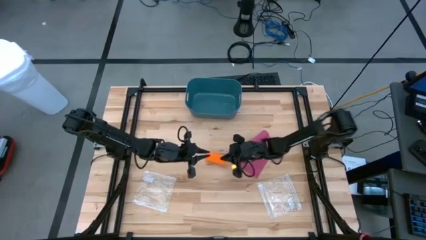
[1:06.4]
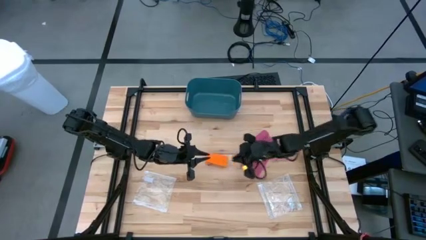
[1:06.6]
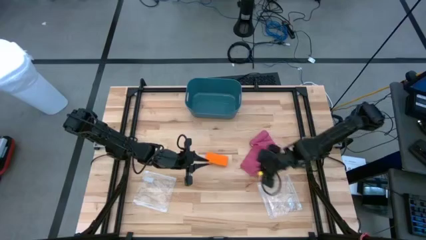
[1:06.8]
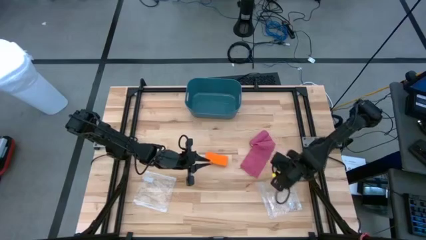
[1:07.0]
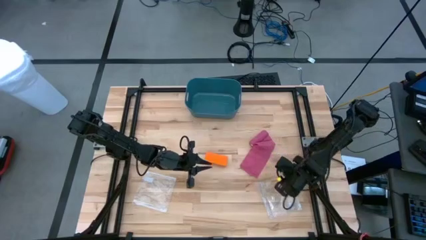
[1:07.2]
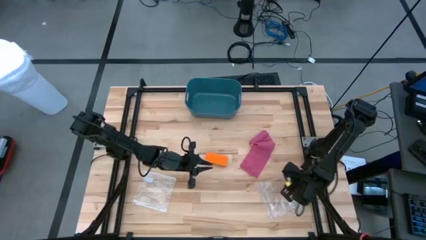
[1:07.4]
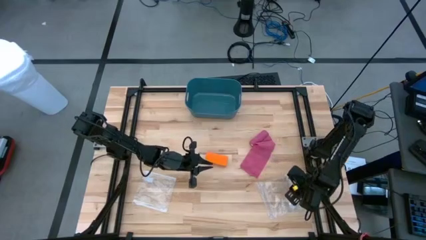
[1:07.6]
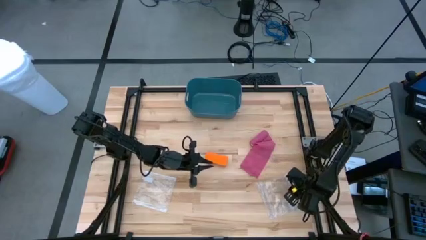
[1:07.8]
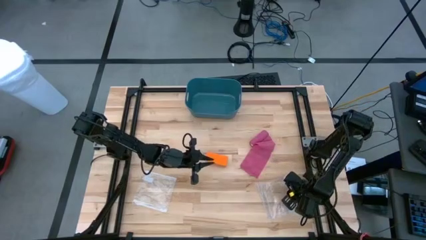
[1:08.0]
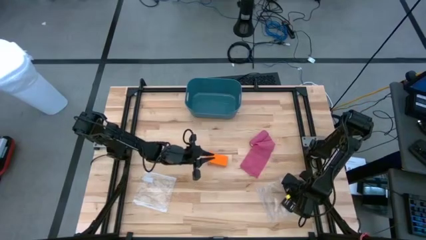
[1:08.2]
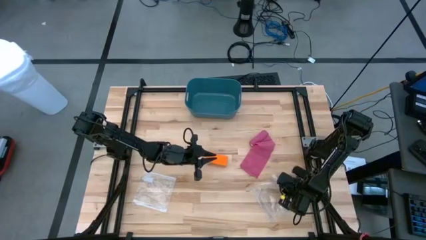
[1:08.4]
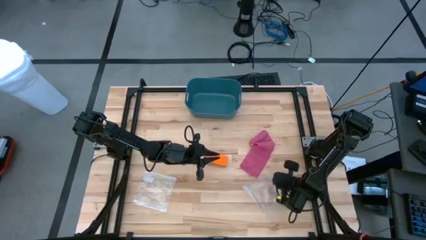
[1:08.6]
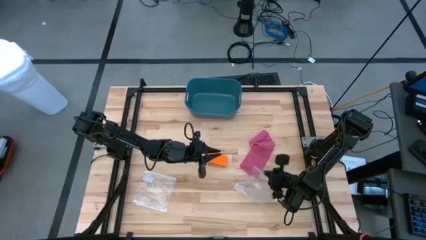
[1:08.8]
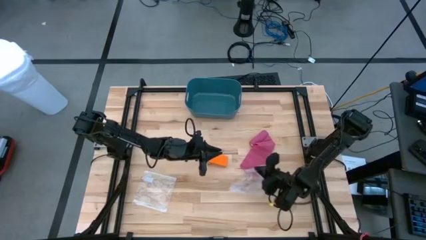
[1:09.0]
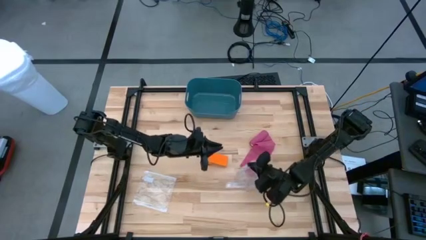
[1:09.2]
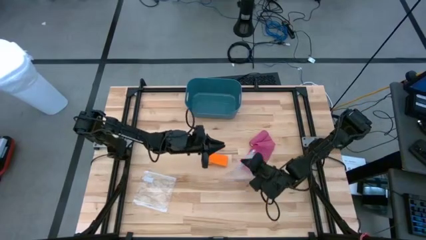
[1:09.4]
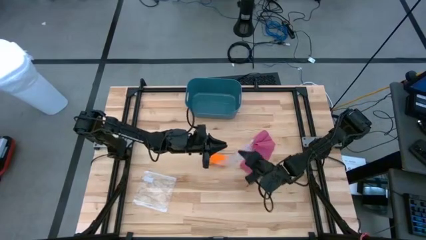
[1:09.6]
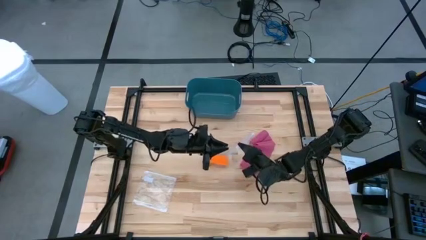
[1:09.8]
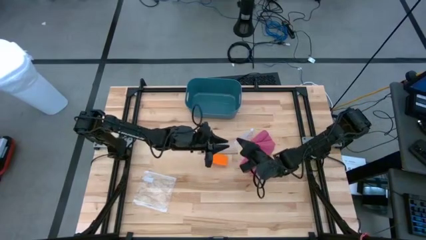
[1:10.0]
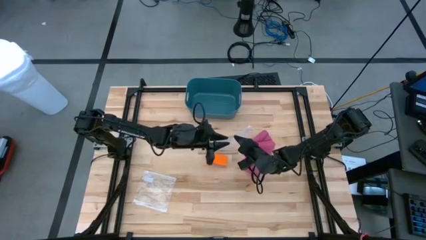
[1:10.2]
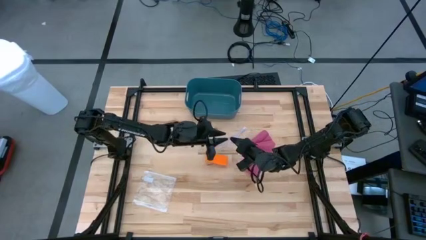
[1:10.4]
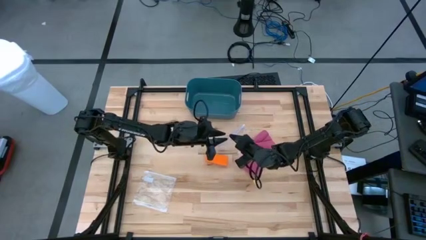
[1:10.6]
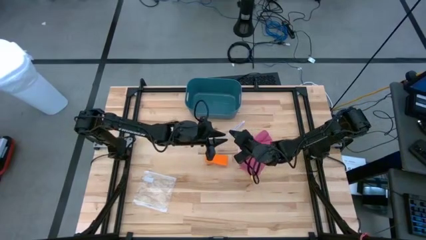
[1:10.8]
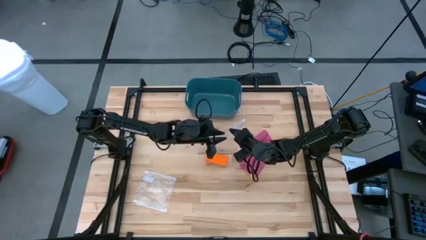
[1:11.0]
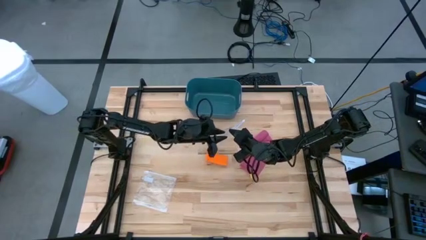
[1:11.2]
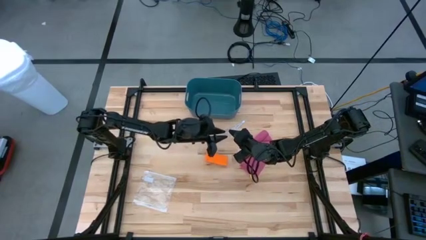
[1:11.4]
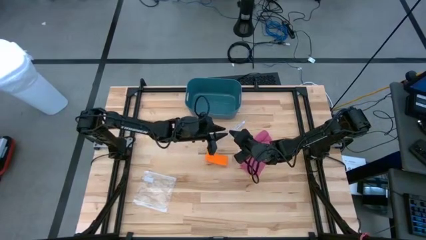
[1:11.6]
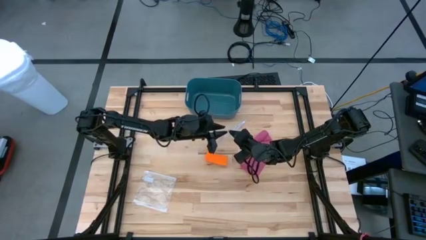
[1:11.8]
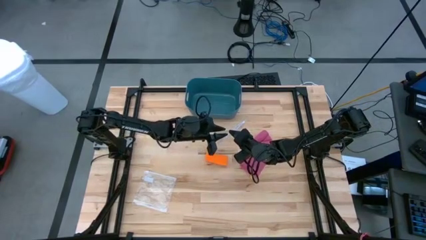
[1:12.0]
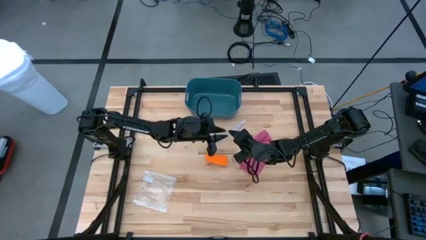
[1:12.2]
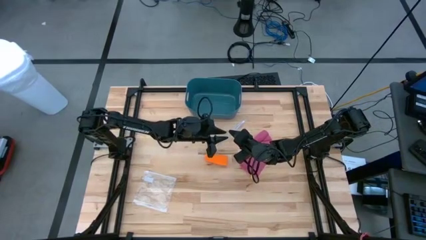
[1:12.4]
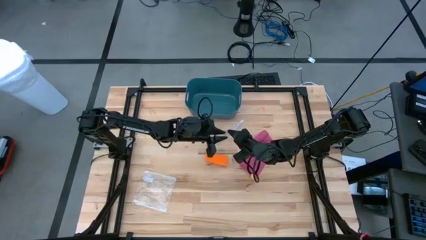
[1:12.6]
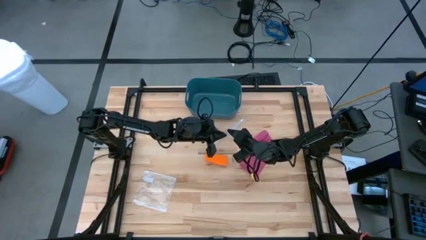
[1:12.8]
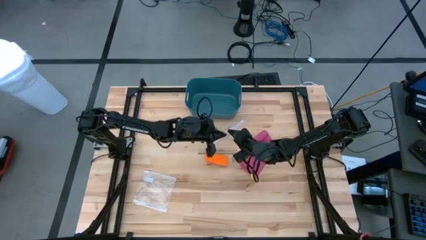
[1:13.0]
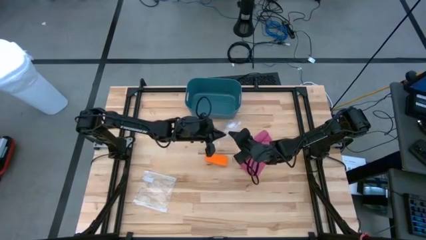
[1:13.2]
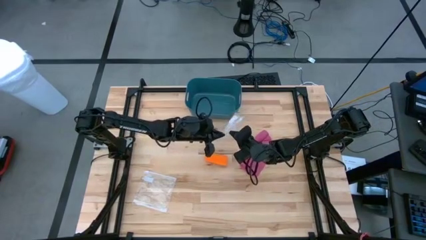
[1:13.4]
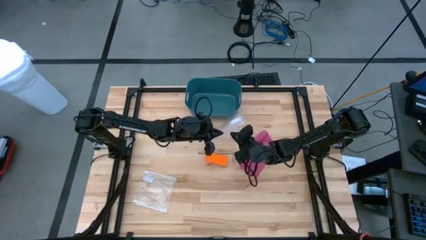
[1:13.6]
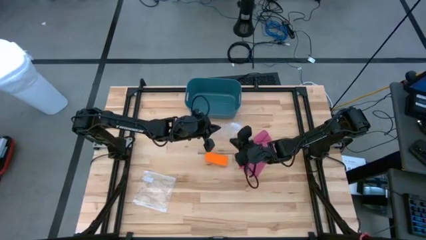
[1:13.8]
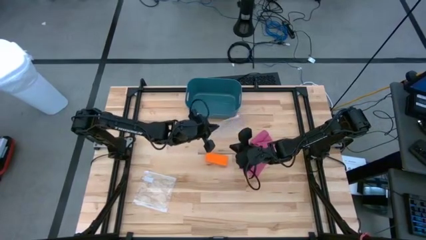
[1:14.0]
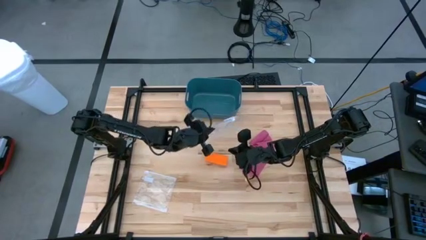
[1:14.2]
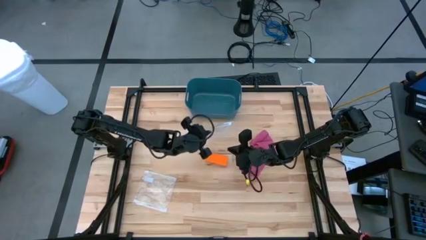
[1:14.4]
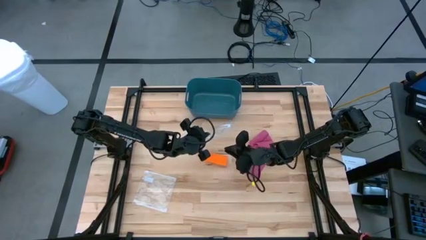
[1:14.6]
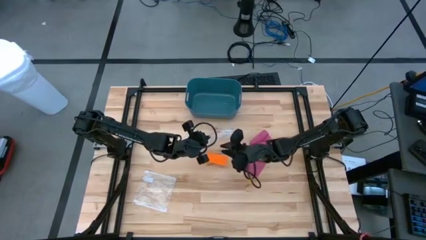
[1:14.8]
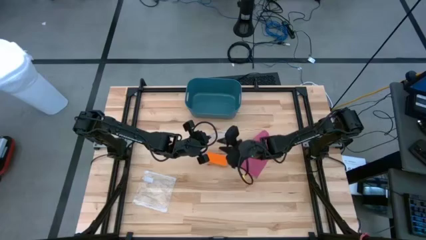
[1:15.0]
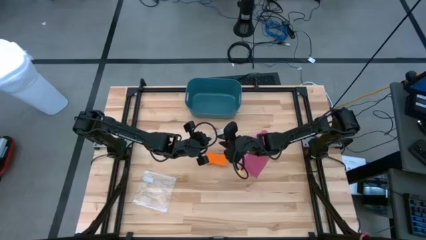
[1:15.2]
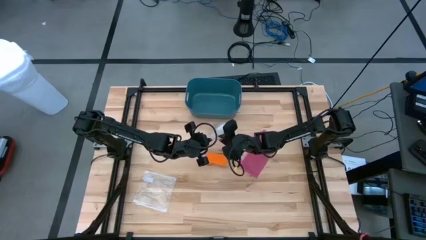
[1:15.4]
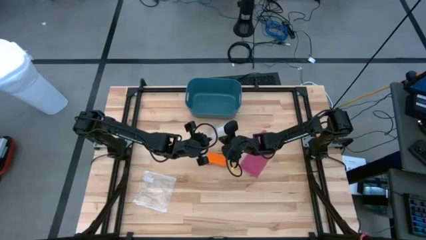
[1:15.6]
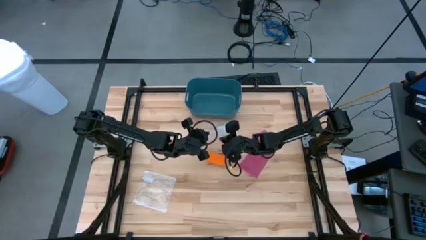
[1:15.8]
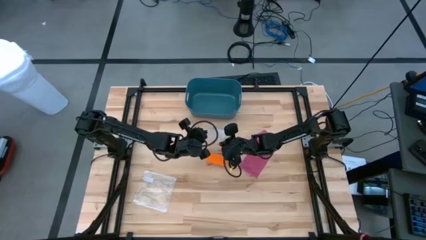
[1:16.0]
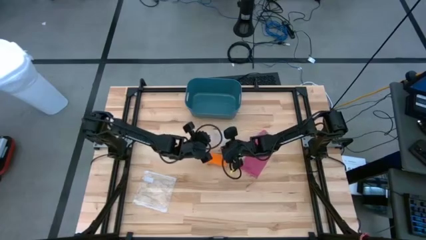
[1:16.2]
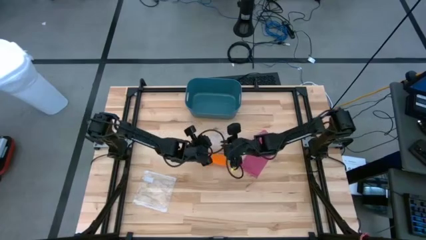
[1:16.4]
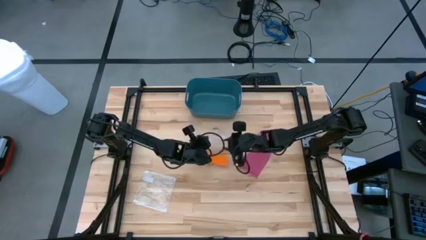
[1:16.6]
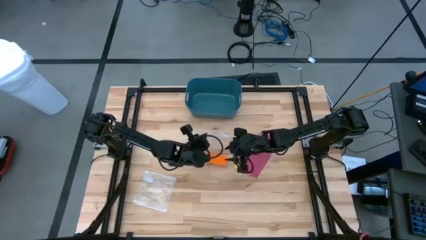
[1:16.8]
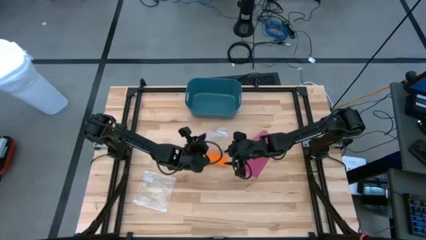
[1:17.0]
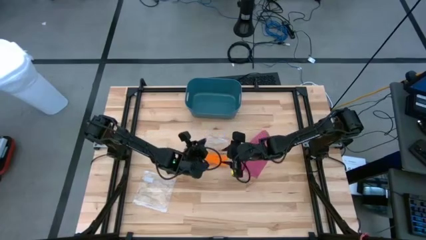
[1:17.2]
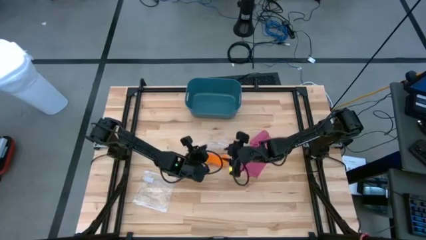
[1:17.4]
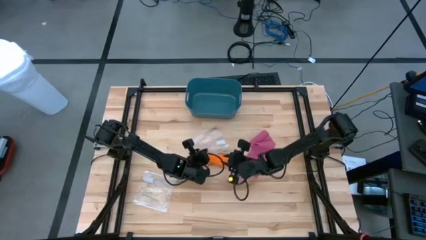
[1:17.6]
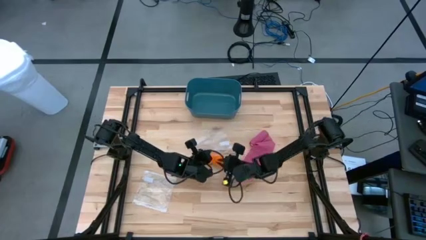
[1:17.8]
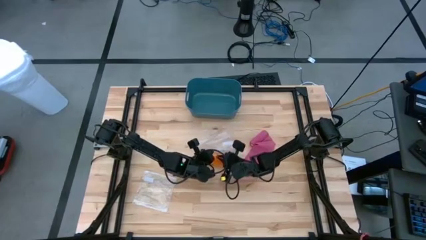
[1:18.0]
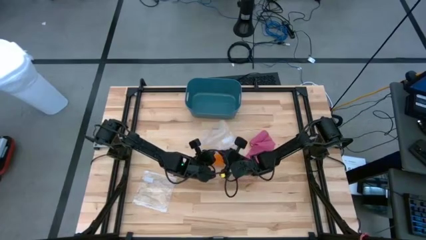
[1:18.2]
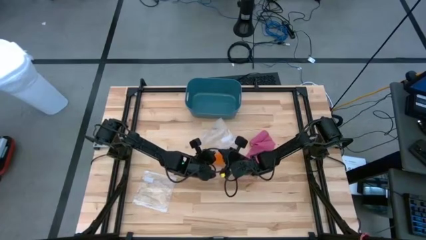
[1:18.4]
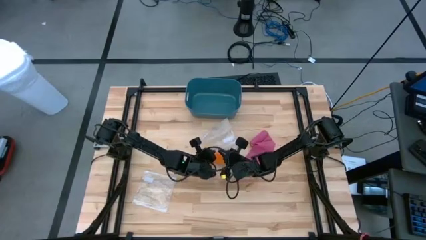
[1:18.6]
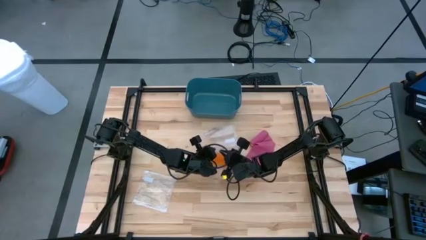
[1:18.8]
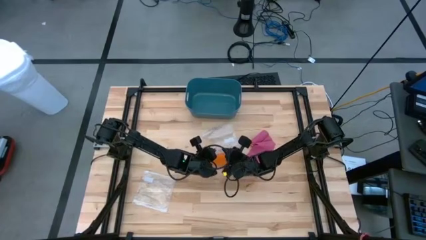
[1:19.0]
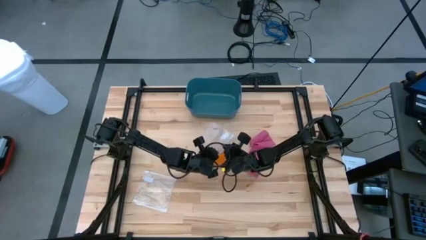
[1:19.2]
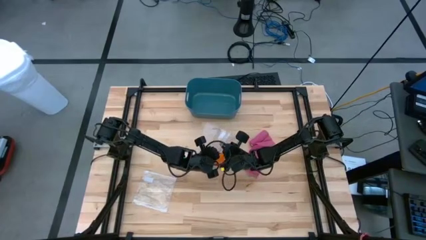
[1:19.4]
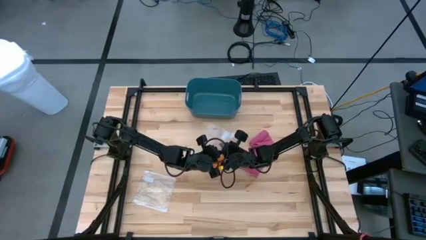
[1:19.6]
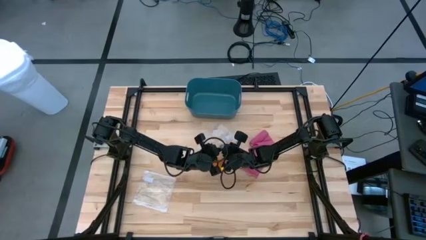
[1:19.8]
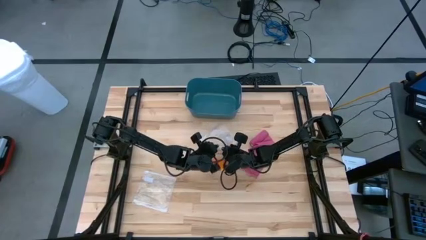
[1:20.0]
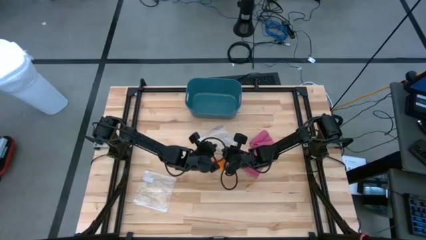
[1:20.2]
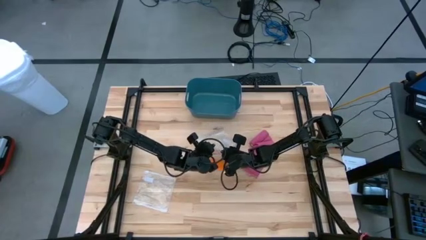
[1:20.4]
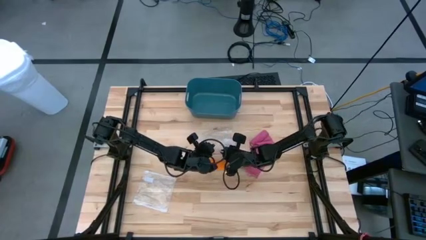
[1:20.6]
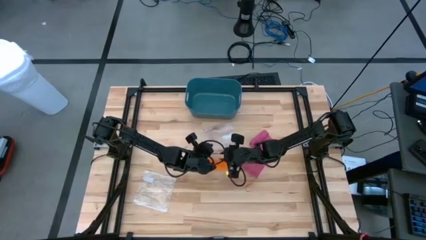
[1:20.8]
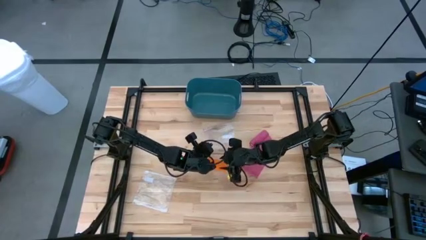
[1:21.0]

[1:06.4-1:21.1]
Task: Roll bandage
Put the rolled orange bandage into the right transparent zip lock
